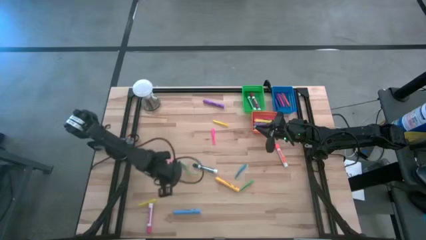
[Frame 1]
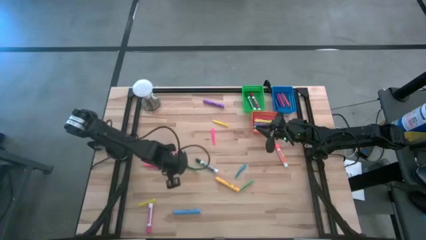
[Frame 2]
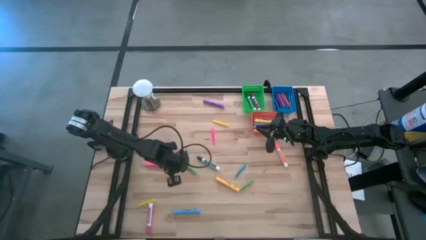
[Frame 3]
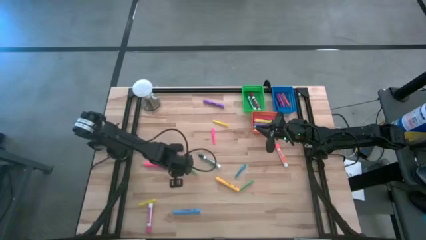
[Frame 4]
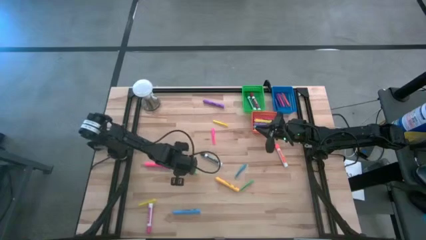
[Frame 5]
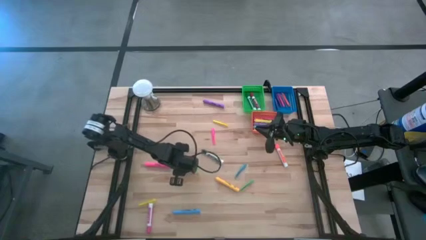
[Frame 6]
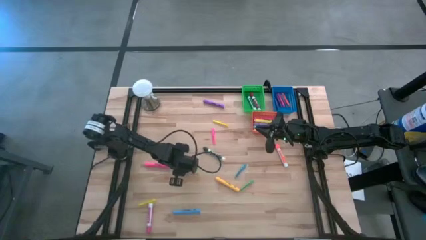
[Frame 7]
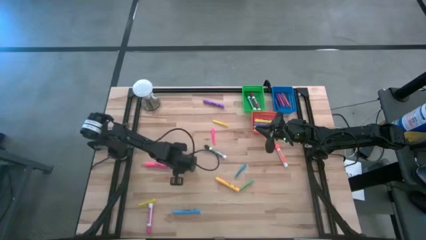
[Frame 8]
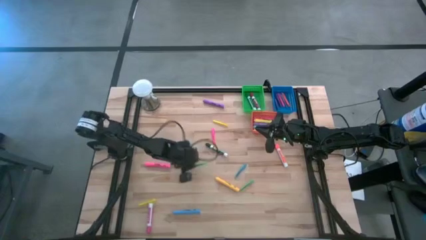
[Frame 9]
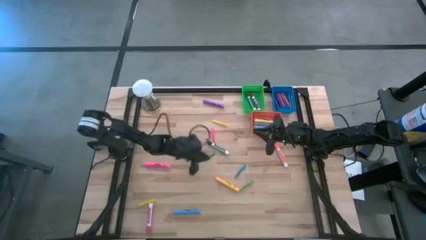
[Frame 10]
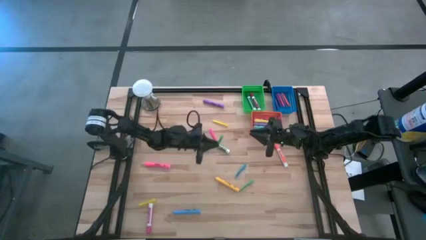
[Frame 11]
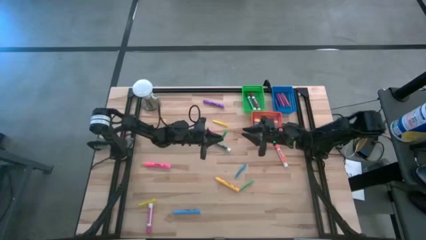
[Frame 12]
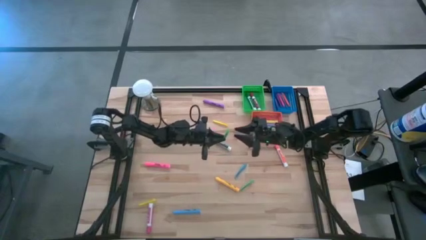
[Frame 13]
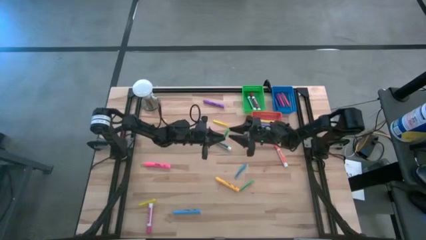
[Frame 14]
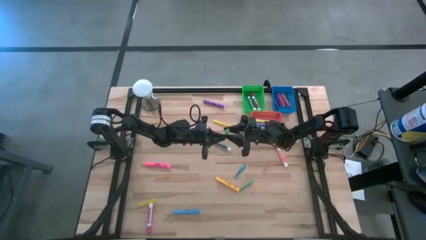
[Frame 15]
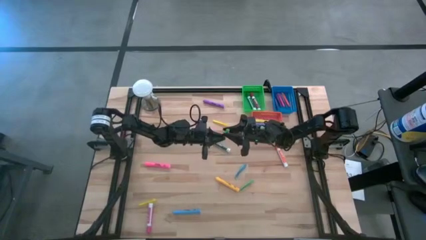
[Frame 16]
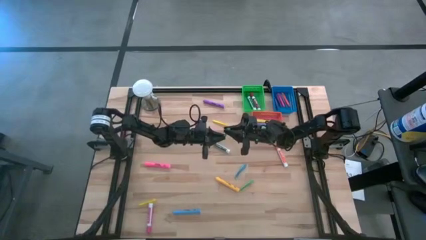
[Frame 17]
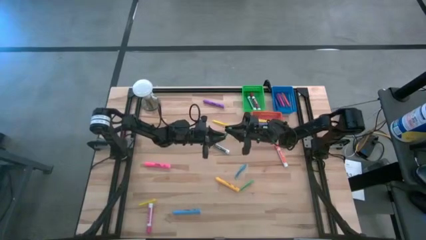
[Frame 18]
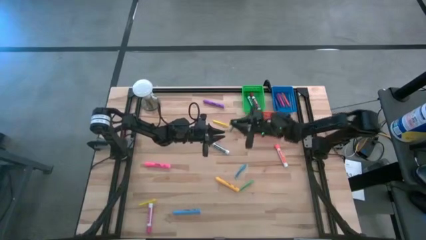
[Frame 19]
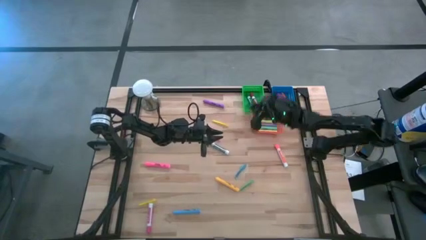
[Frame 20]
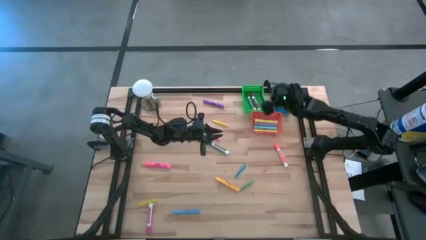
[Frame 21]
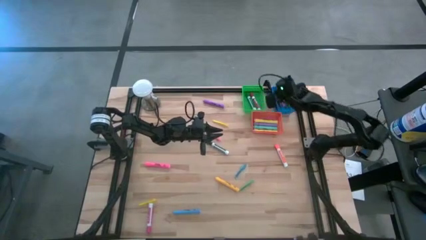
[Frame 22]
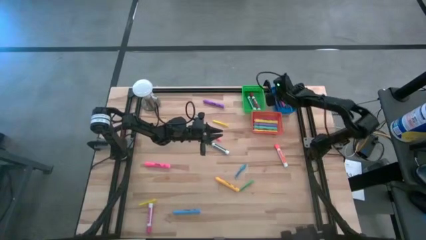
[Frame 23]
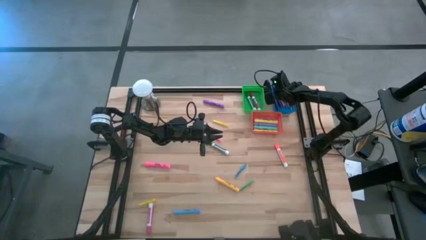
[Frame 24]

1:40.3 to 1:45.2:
Task: Pick & Place Markers
Put the left green pen into the blue bin

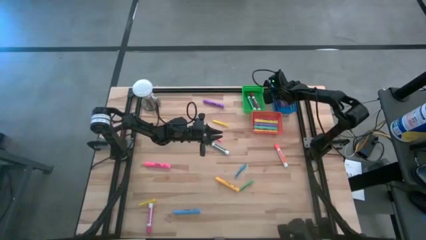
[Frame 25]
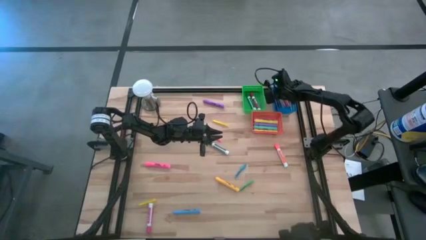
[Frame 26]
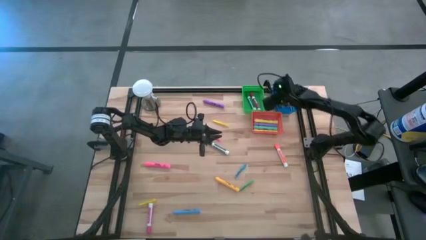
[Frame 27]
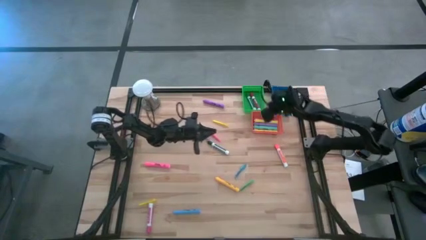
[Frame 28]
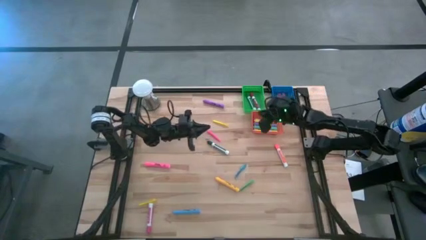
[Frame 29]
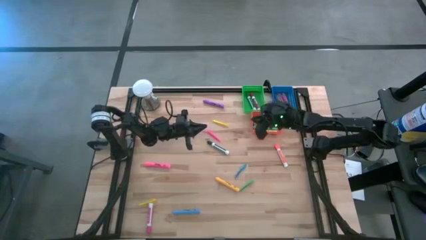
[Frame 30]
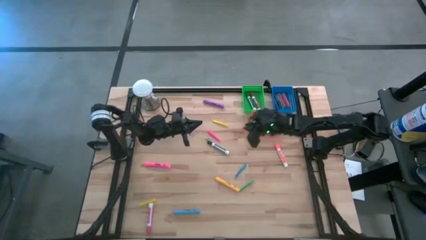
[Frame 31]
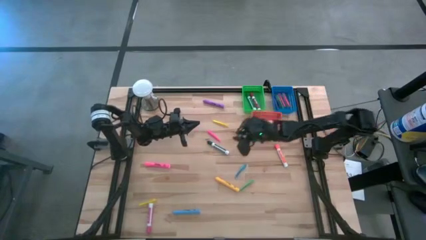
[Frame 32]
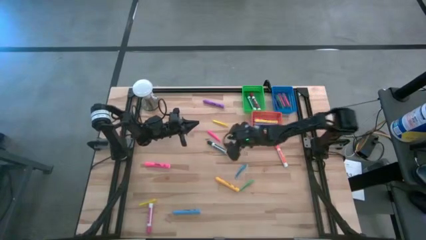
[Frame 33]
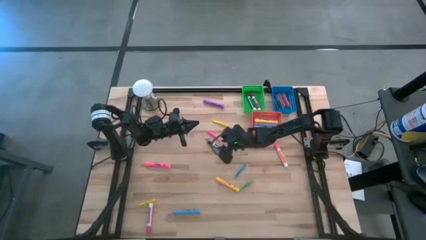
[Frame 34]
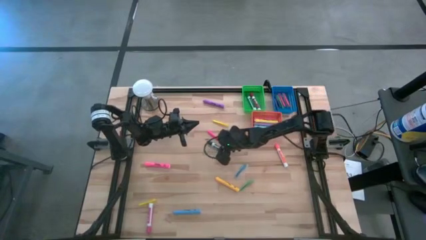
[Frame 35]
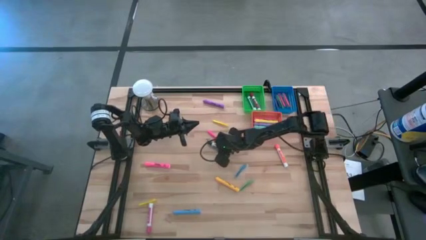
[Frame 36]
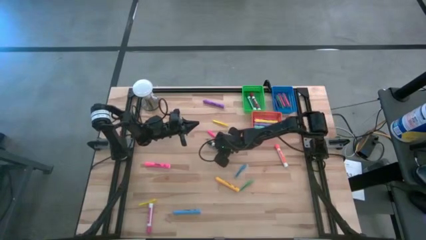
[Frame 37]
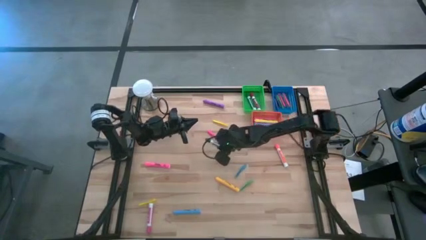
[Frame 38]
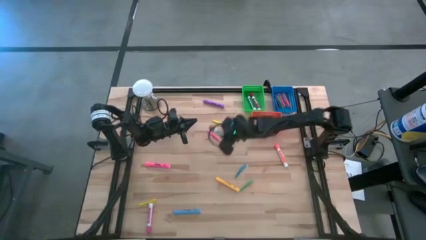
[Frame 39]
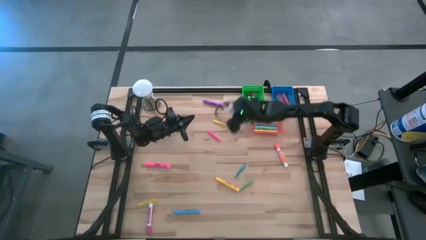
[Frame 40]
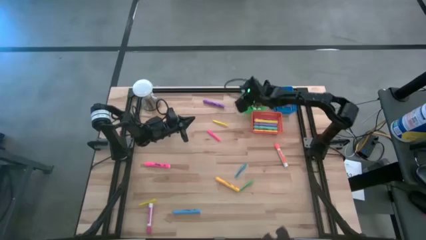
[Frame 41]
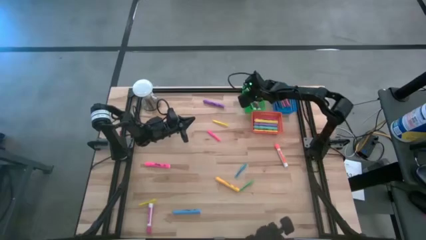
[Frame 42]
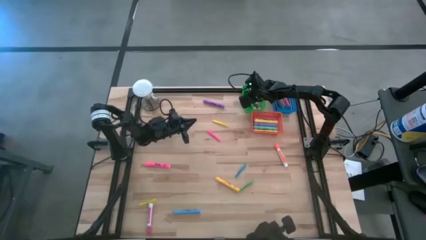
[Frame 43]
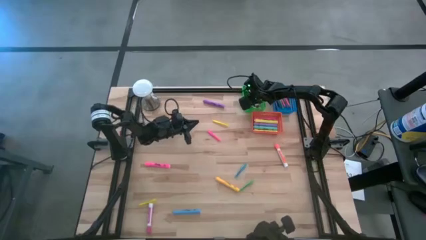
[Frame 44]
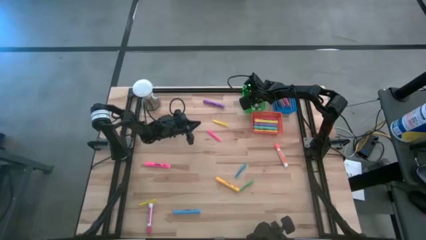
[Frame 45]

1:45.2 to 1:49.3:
Put the green marker pen into the green bin

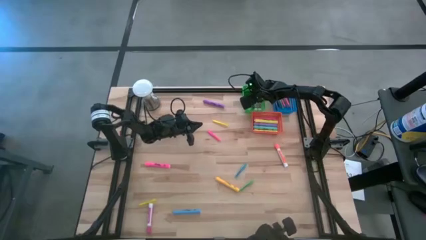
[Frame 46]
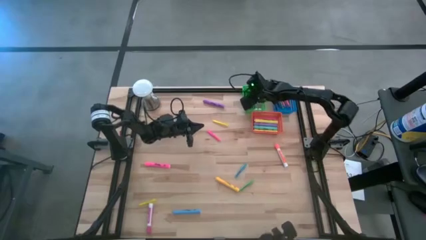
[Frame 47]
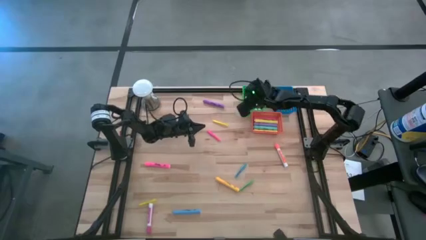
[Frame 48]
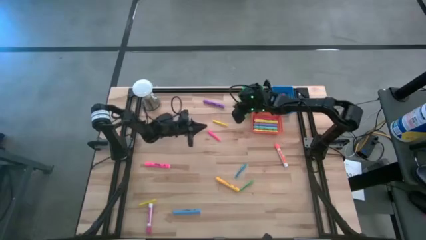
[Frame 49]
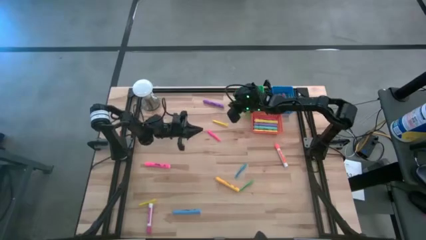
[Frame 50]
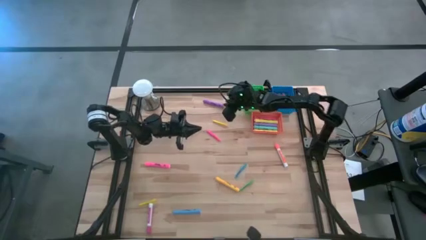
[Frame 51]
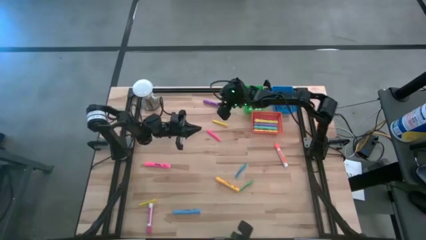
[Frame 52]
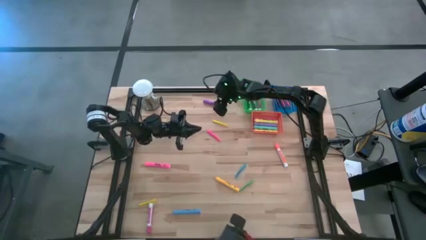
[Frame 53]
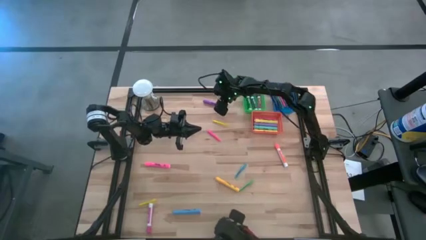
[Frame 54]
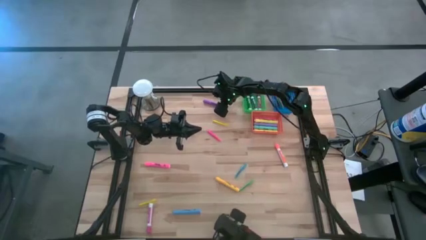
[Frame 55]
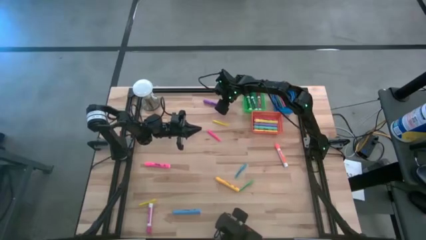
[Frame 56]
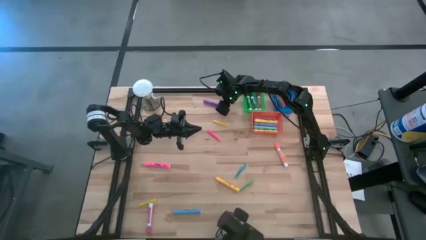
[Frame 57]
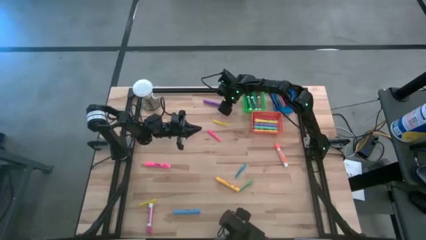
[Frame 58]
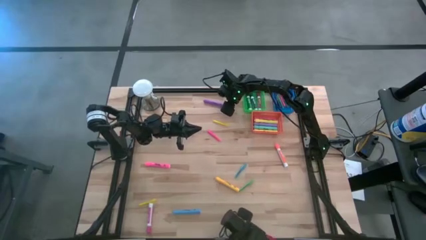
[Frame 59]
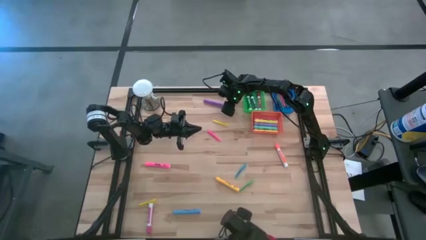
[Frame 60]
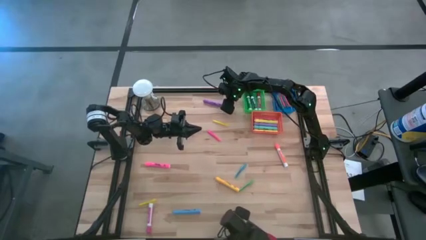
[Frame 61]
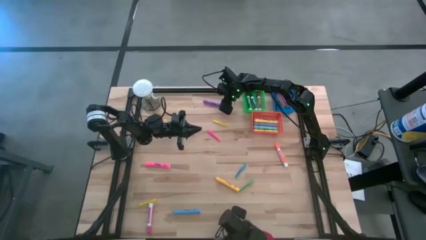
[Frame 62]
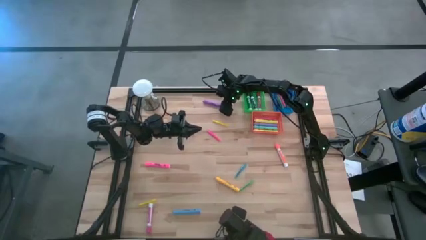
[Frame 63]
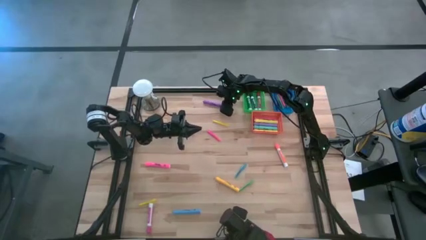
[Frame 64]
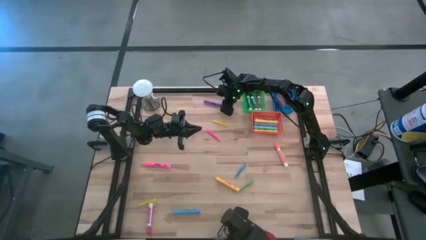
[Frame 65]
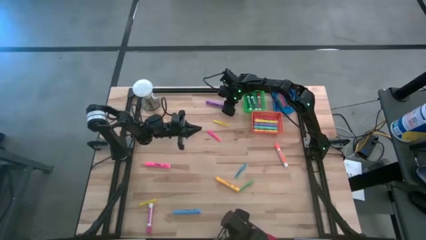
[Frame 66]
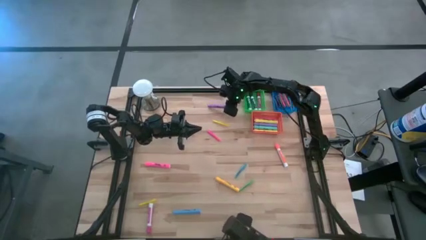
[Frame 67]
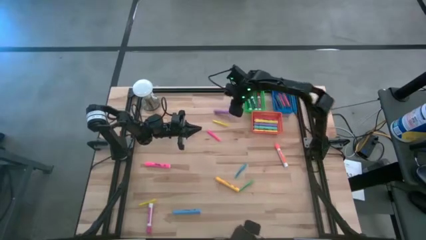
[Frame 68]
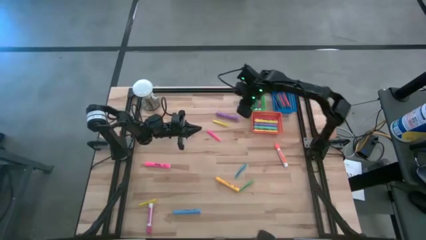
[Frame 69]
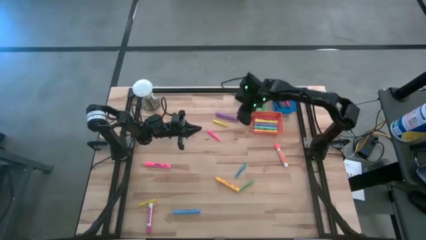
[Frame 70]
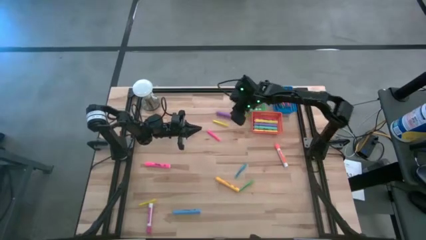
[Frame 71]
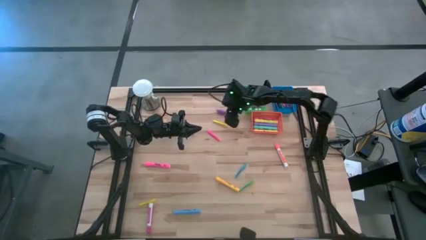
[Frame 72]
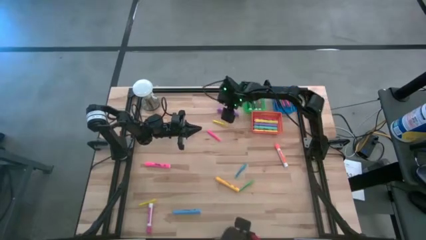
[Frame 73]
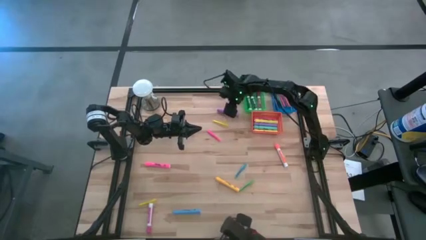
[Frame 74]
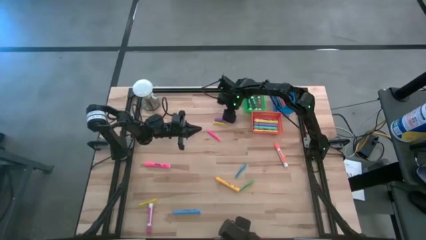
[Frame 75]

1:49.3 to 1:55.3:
Put the violet highlighter pen into the orange bin

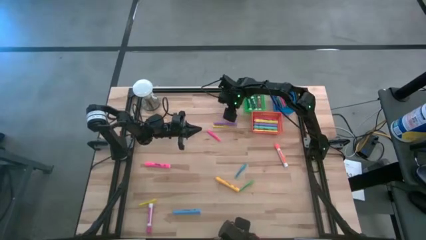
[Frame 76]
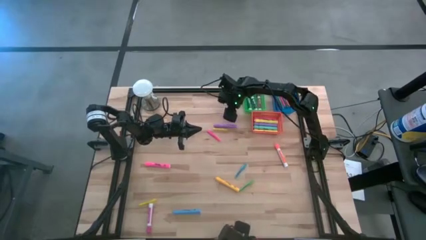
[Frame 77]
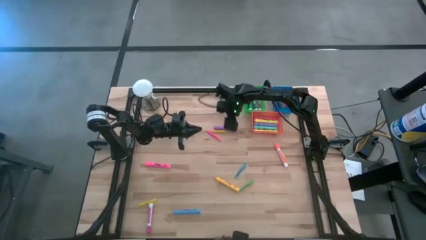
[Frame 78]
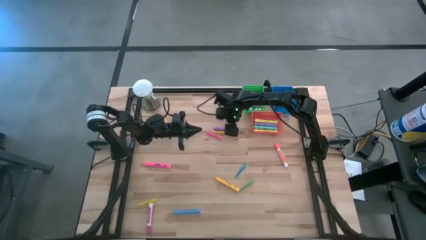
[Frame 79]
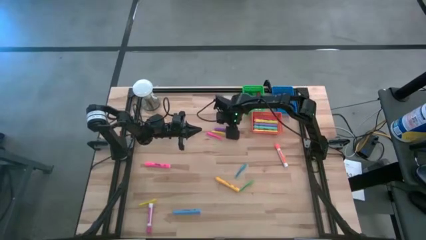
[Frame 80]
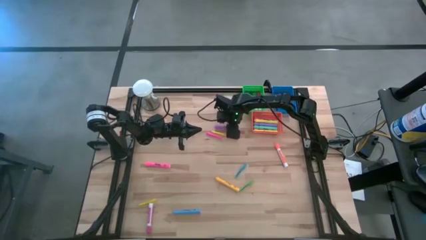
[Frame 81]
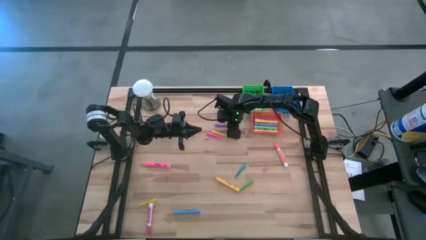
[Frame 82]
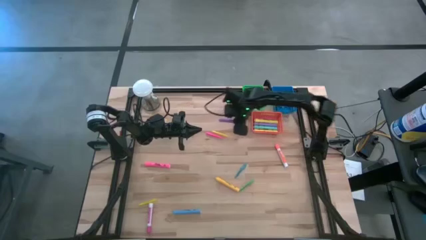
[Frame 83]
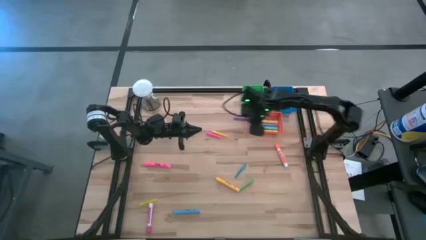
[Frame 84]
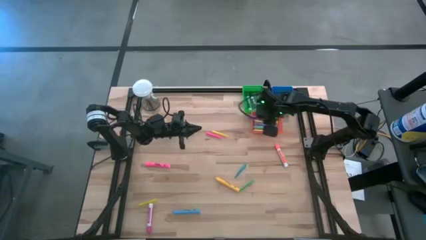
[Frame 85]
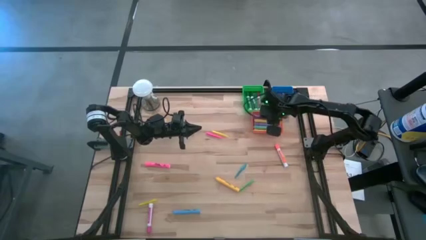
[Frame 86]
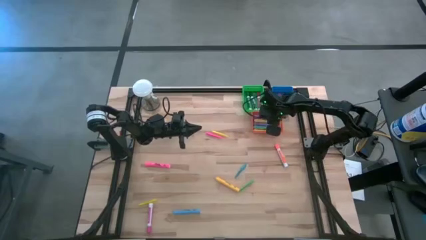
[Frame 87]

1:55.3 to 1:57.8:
Put the violet highlighter pen into the orange bin
